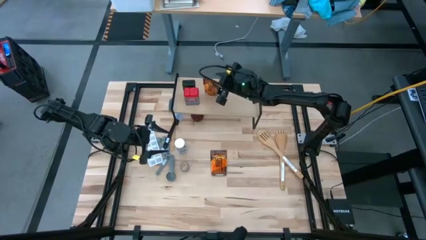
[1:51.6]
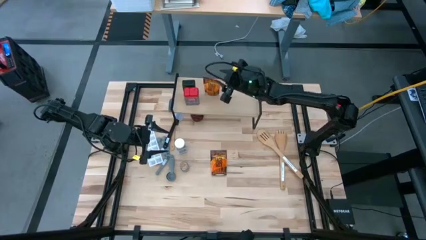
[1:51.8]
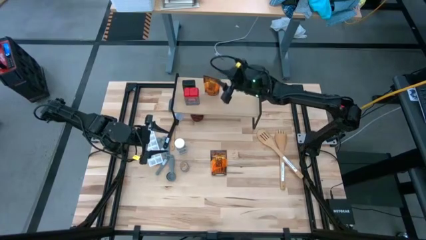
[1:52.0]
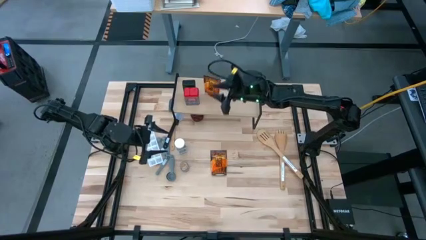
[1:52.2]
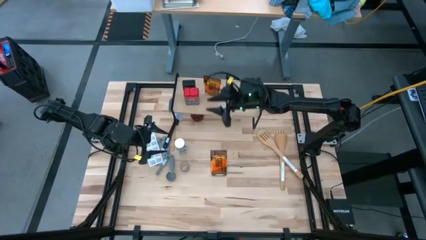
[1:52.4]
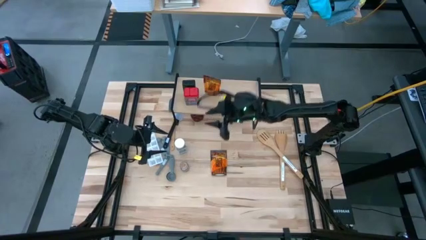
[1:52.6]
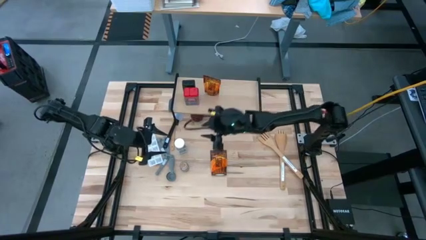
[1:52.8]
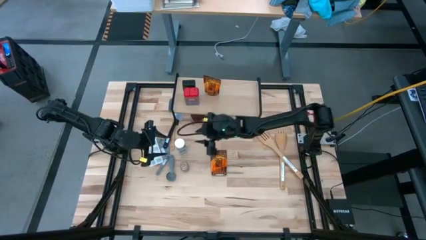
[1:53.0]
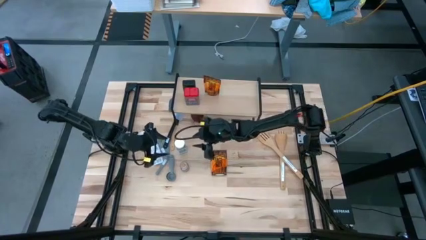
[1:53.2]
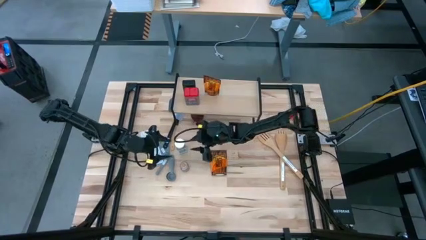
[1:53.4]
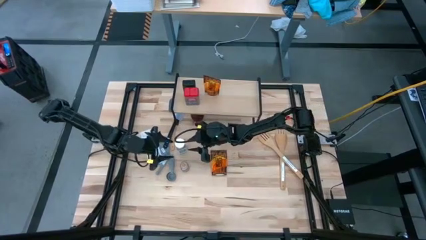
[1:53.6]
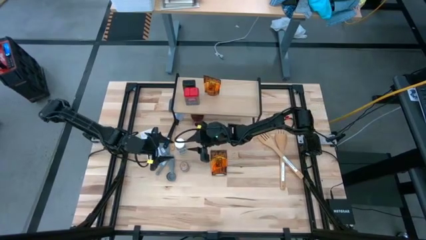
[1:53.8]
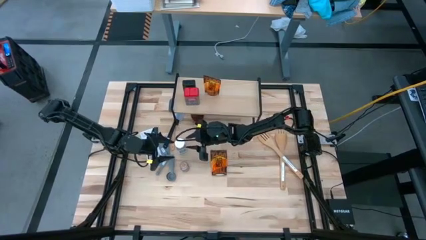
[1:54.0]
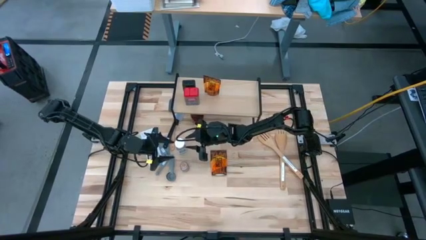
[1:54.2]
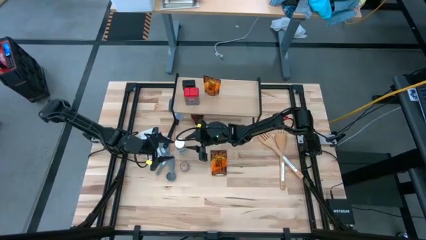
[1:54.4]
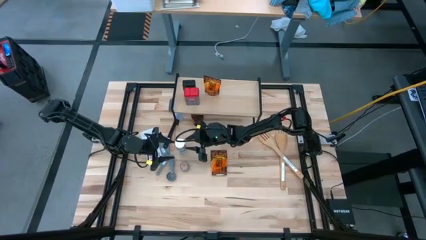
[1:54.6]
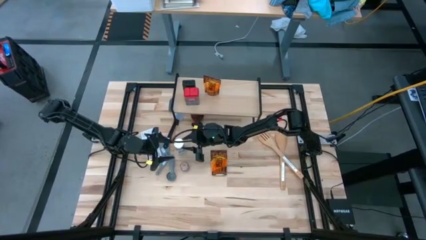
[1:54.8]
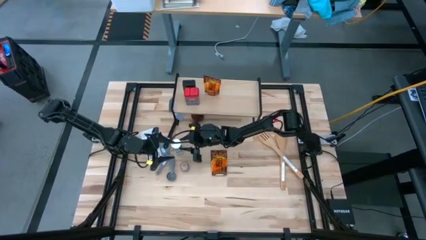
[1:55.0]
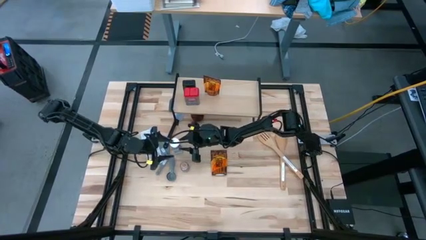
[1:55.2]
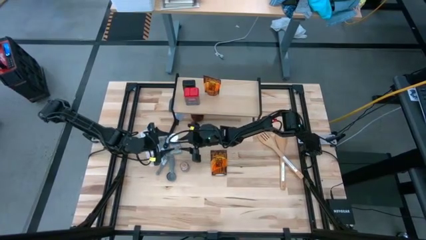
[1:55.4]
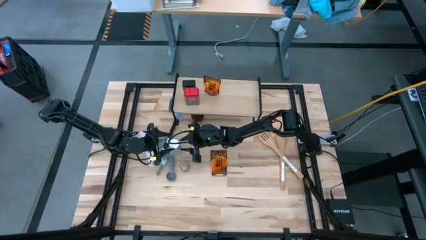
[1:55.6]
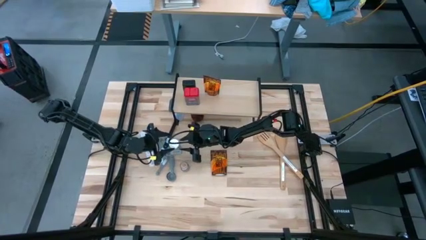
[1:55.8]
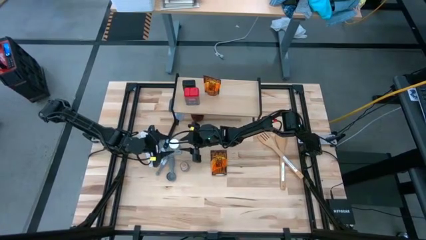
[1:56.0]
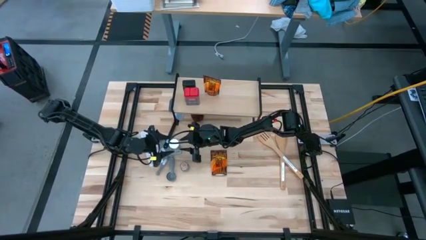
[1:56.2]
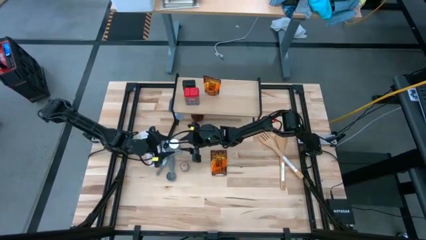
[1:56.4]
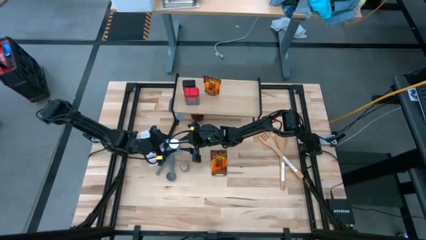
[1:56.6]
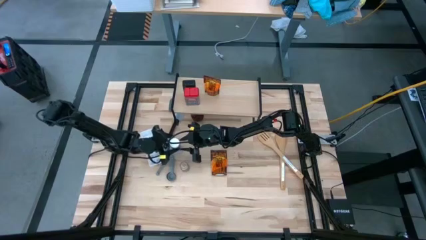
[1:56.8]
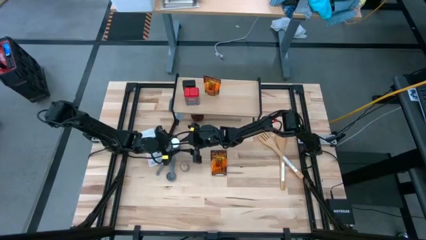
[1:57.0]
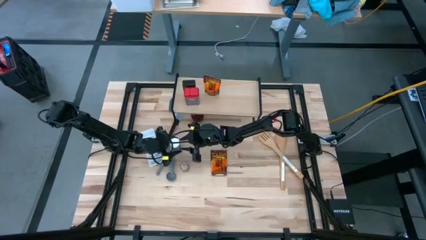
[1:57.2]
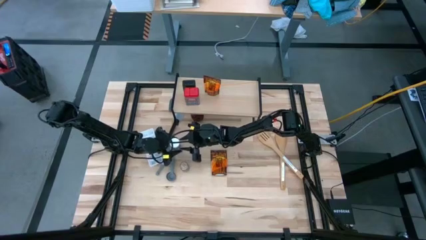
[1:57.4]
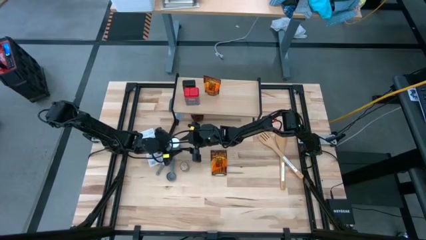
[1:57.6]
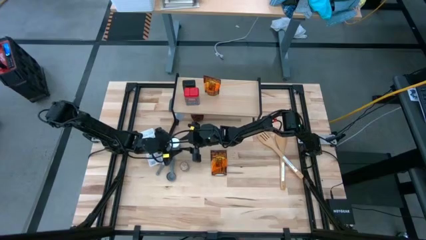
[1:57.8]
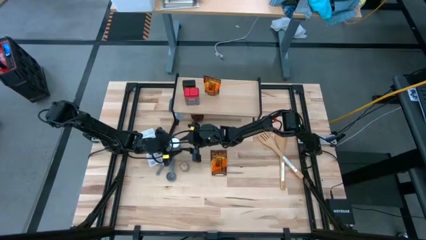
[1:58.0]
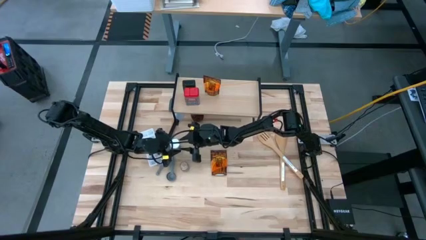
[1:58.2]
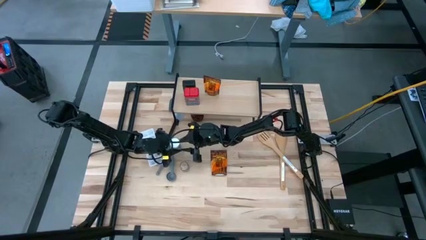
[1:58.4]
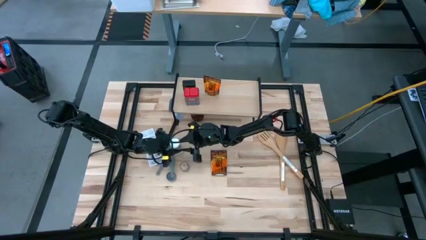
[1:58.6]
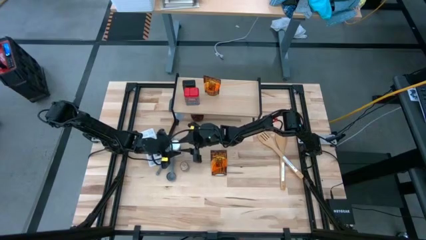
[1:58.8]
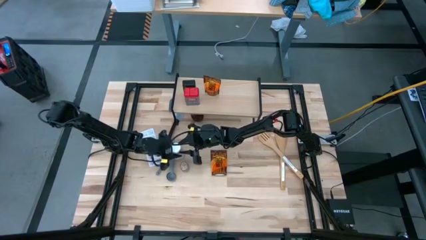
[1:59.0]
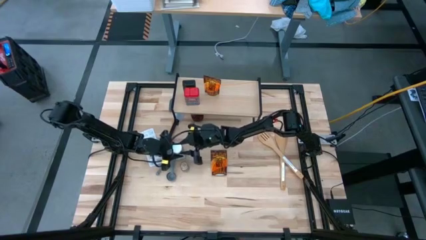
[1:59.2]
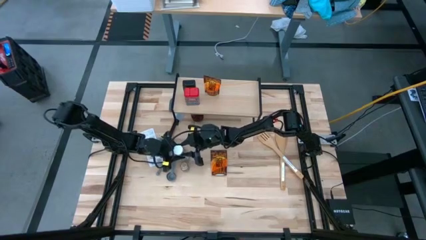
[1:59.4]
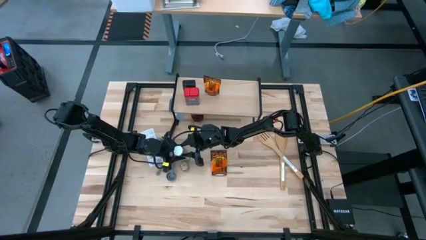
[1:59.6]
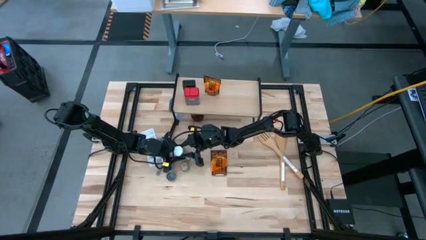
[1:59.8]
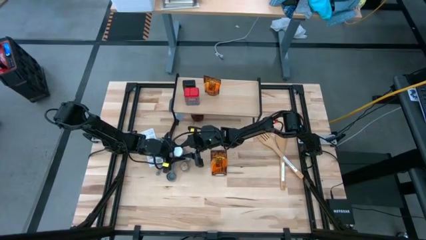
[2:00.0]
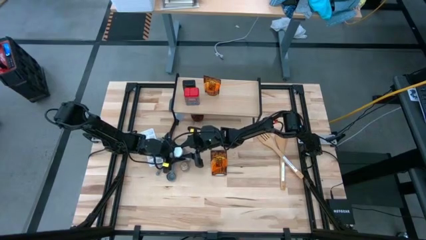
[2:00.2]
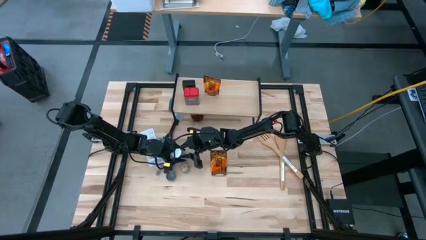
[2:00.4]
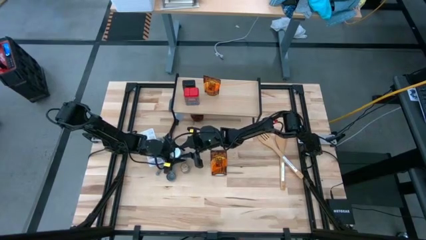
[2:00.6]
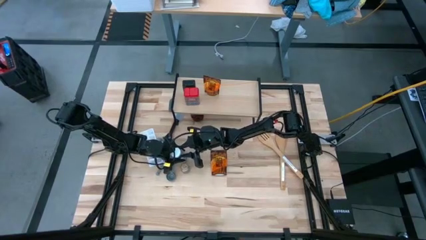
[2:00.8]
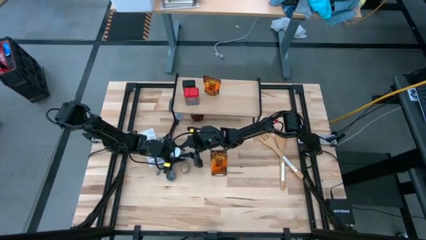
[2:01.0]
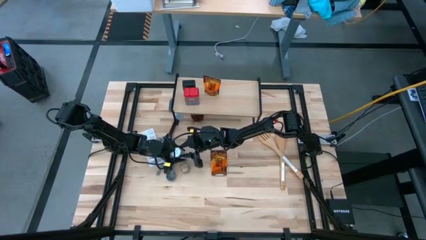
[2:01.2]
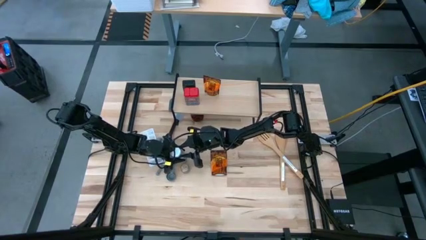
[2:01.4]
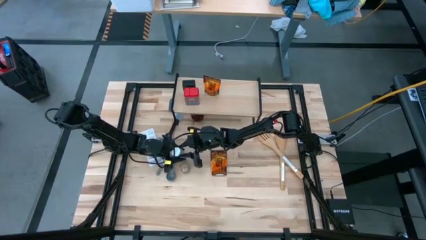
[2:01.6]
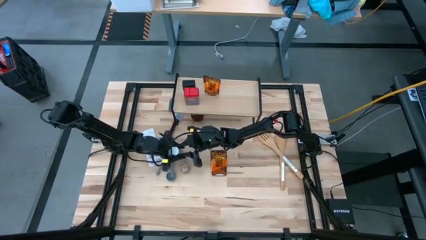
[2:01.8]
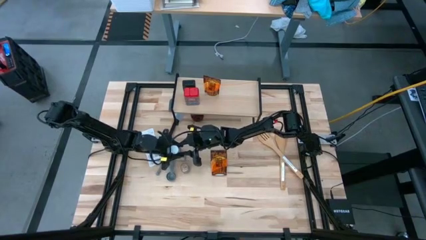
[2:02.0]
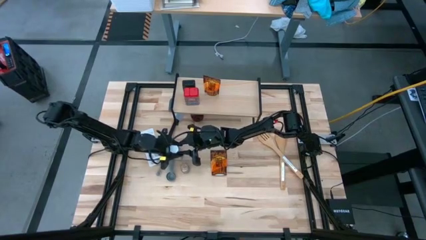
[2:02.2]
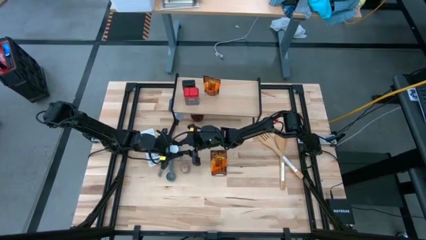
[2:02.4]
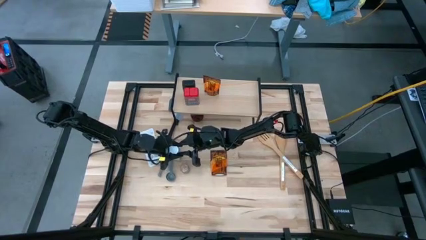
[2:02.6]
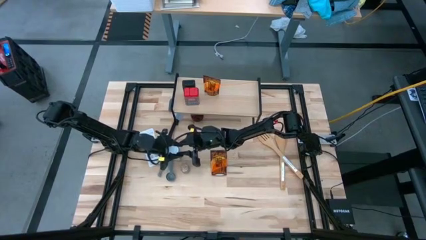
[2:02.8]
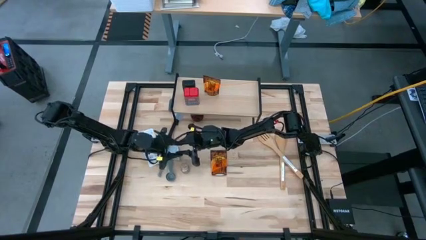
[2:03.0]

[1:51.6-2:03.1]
Task: Shelf spices
Put the white seasoning bottle on the shelf

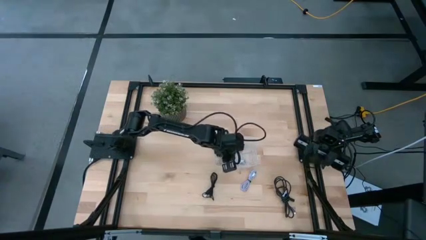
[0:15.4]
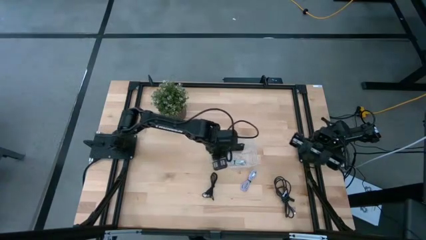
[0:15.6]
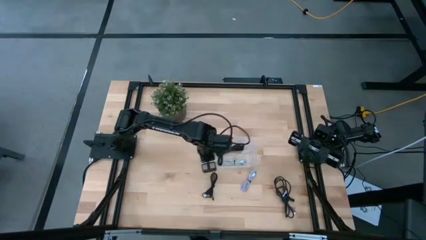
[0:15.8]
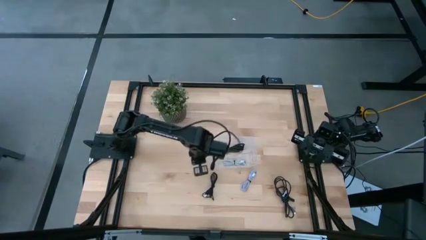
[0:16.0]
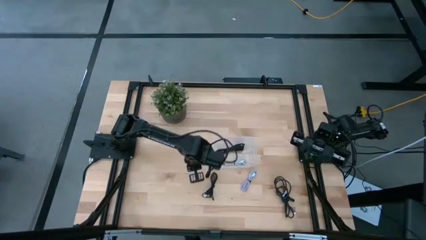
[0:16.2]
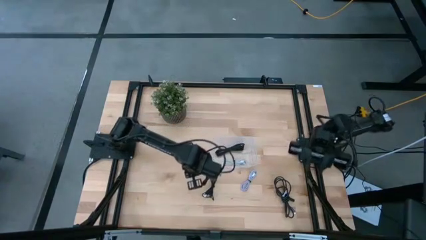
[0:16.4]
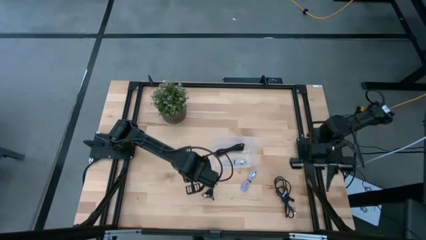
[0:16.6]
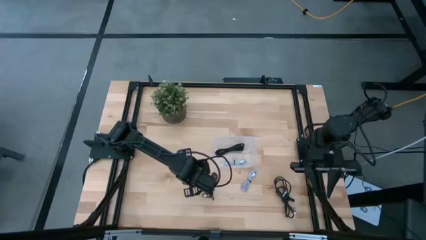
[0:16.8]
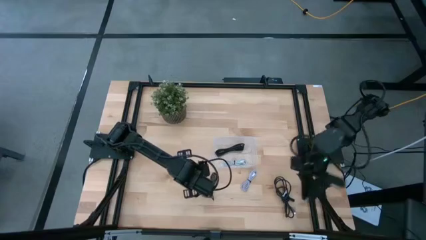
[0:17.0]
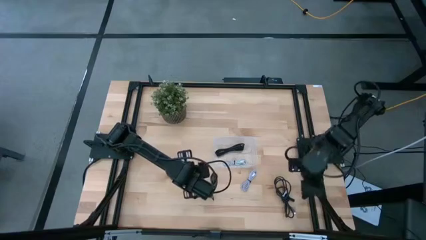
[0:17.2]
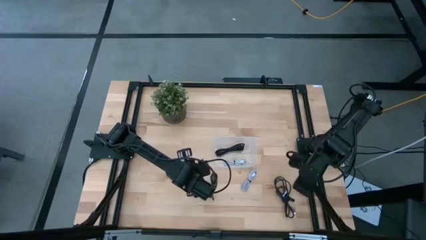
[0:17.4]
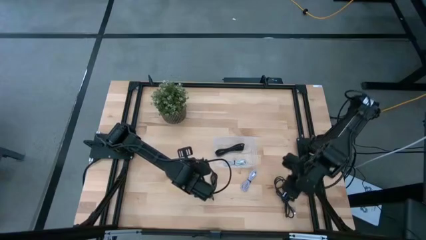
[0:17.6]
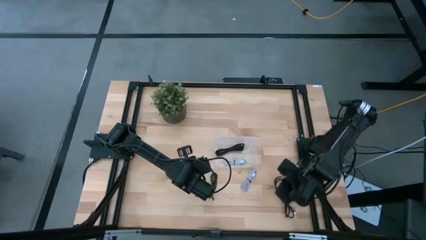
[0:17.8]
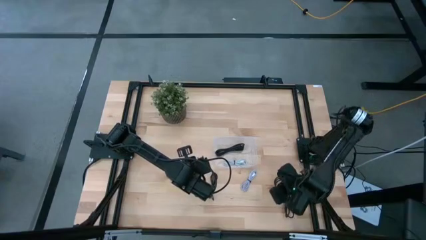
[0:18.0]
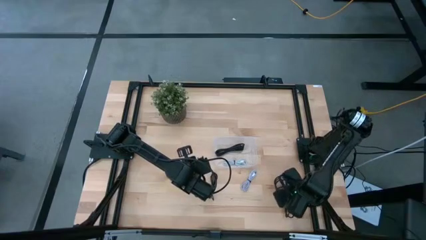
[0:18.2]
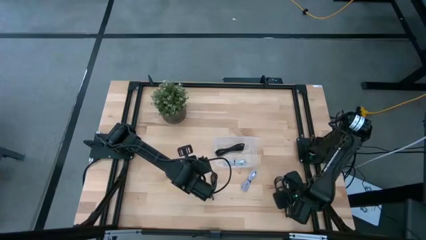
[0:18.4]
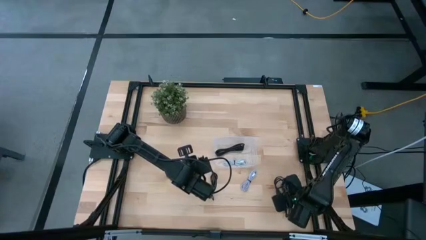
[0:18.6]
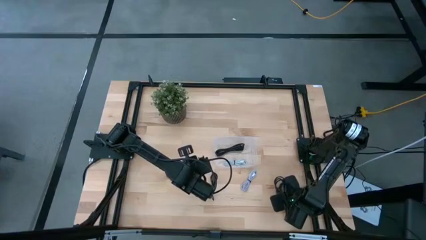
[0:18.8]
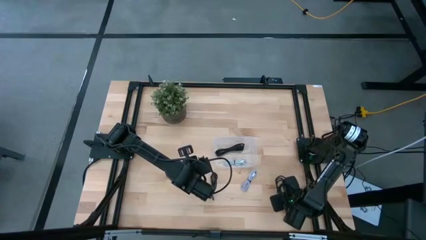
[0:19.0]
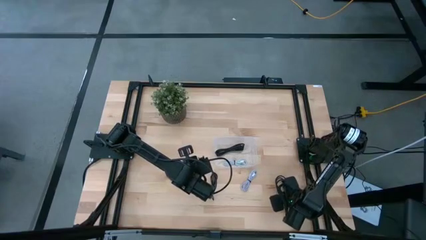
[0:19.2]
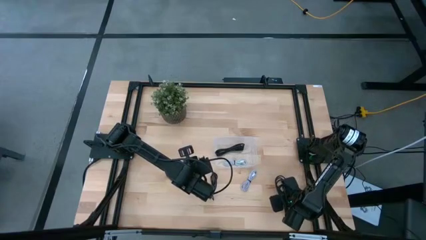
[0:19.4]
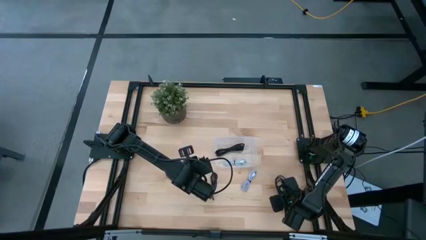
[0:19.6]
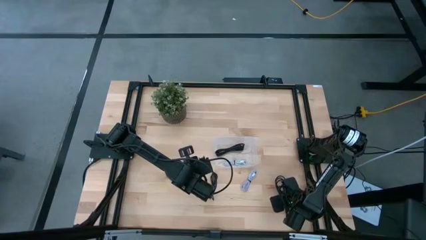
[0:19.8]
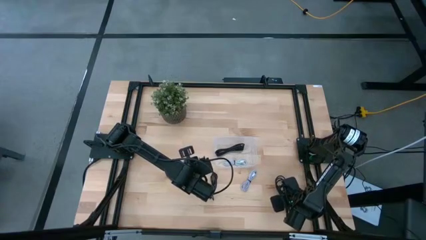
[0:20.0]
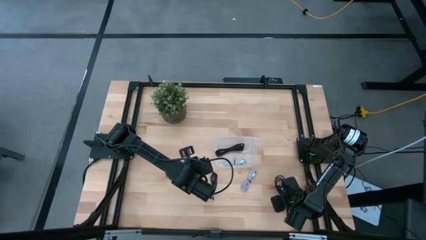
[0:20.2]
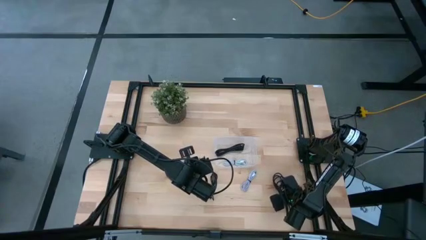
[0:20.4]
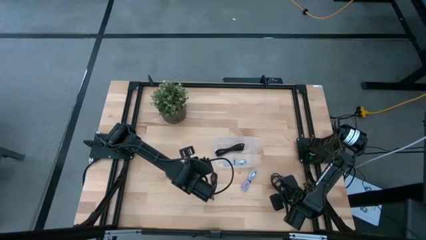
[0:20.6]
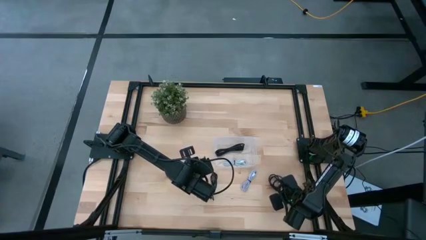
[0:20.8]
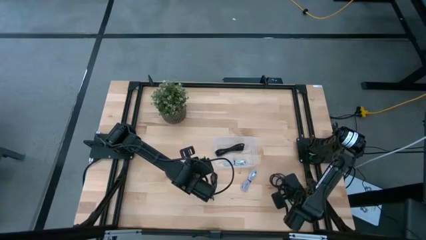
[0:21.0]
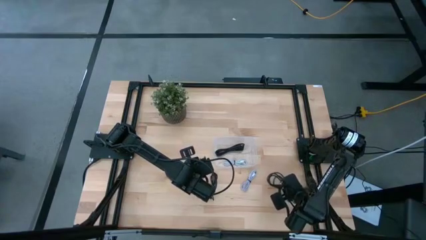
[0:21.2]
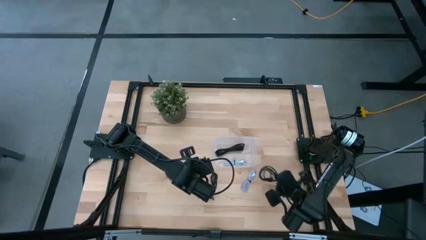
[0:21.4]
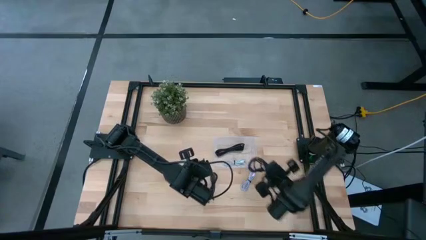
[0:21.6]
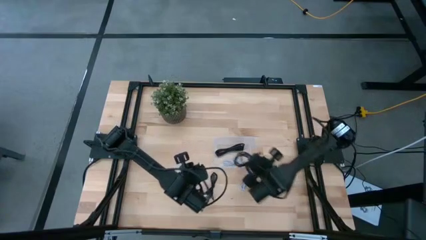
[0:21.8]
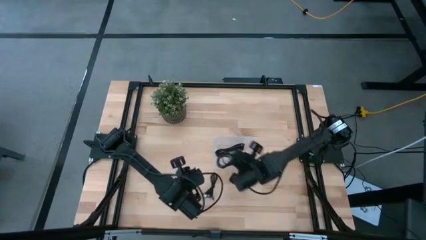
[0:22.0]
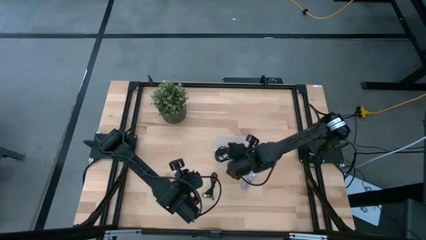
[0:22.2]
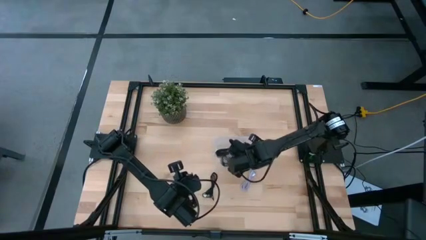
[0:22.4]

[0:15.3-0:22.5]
Task: Pick and place USB-C Cables
Put the right black charger cable wire into the bin
